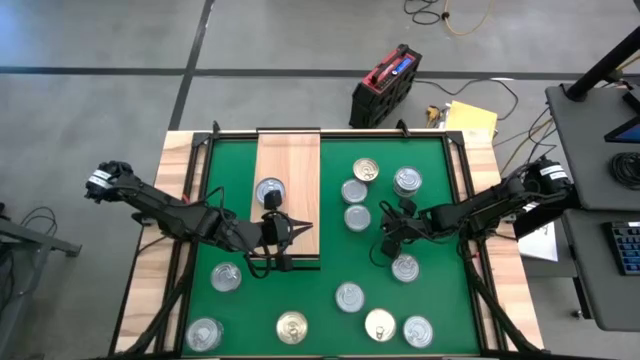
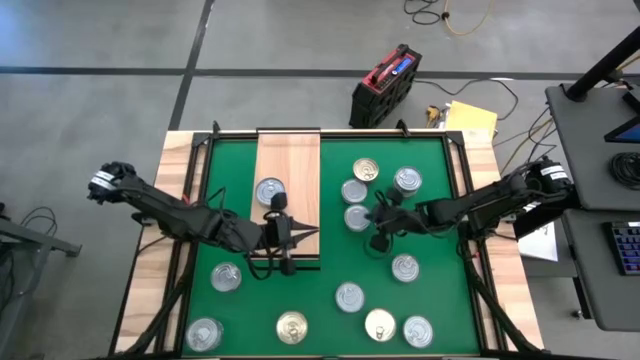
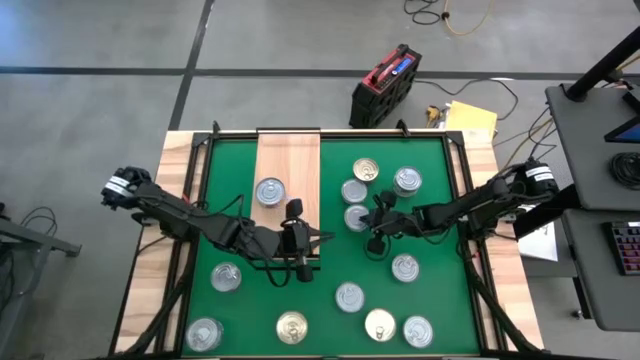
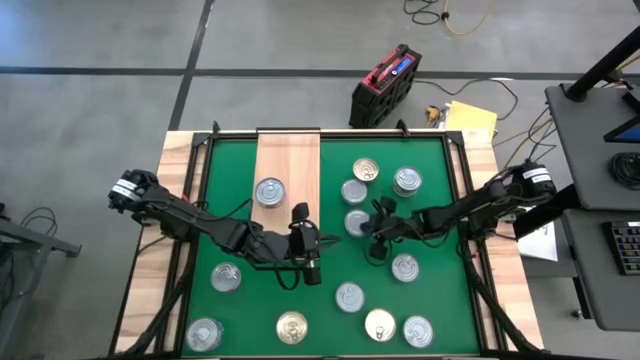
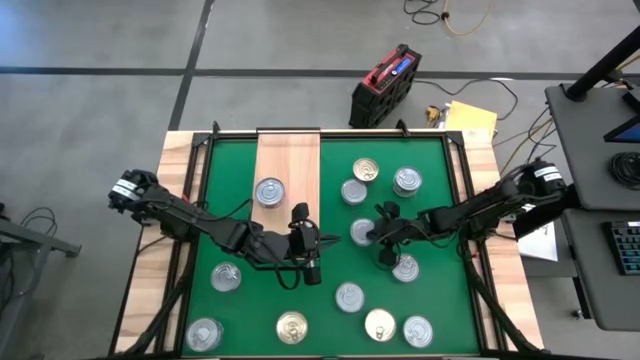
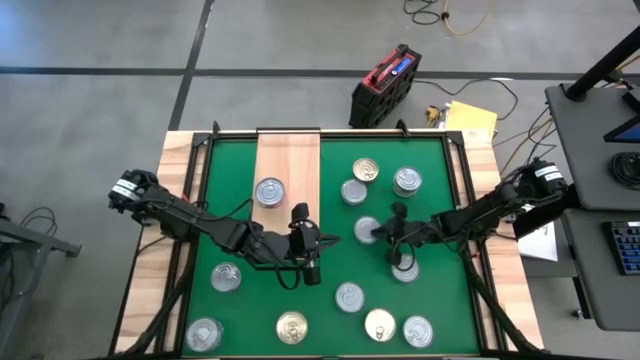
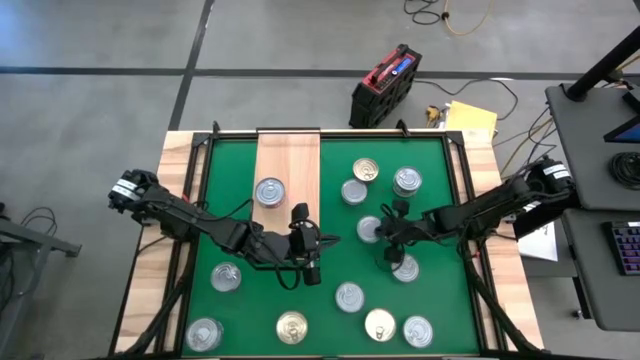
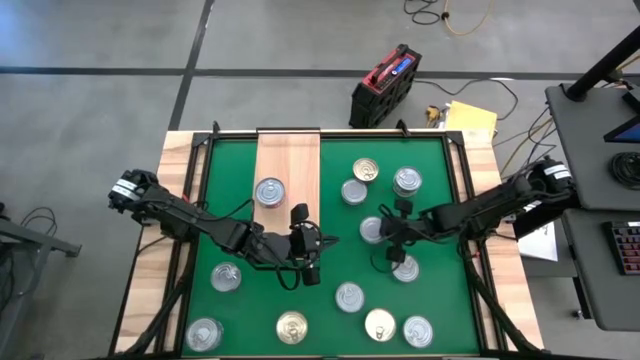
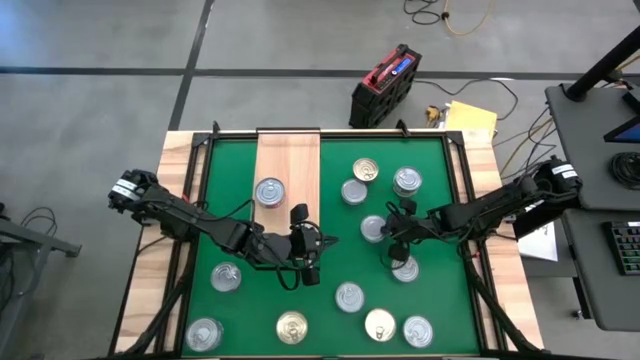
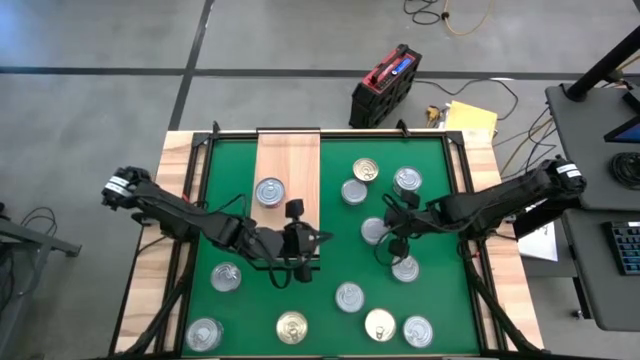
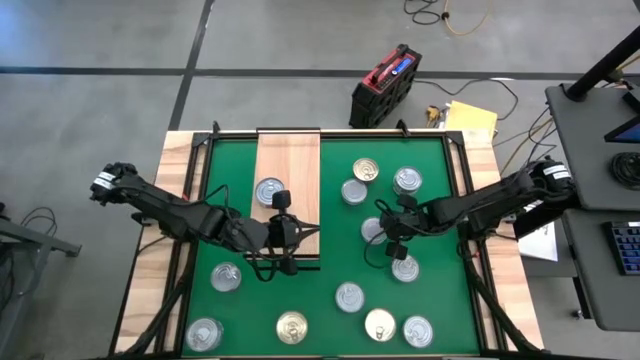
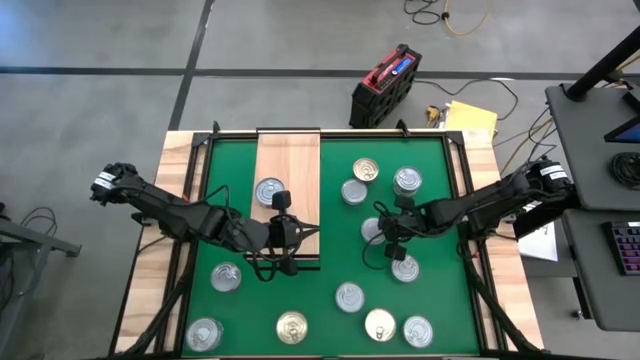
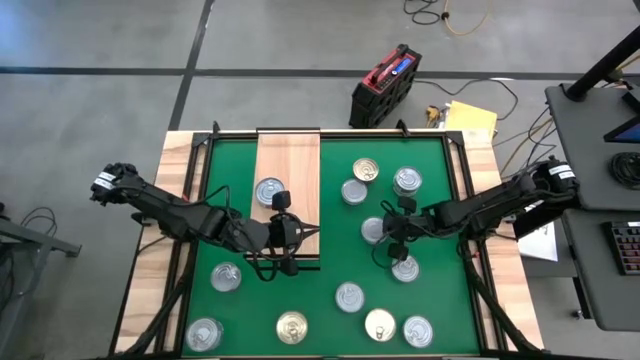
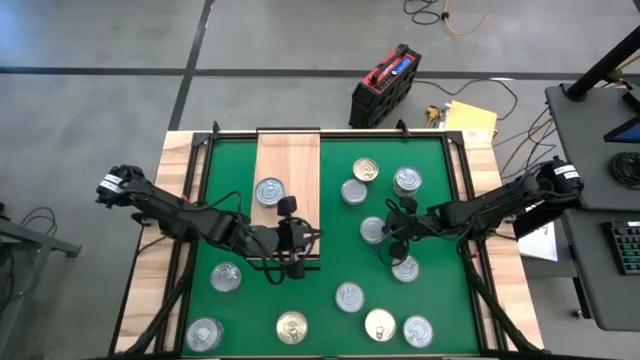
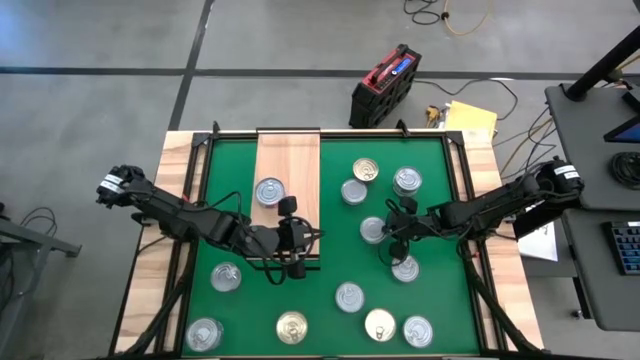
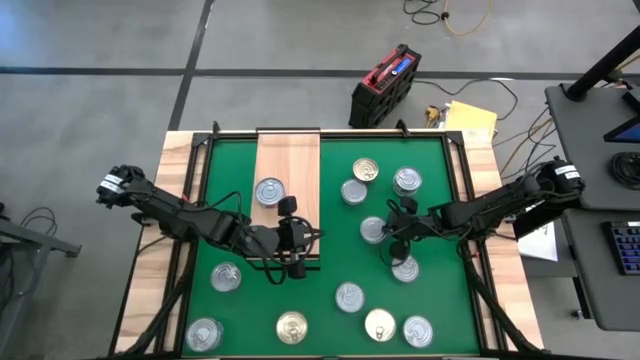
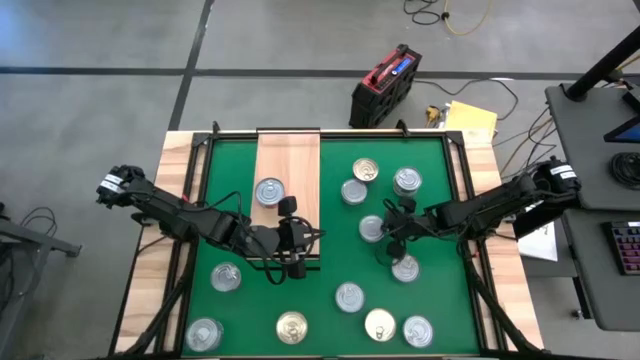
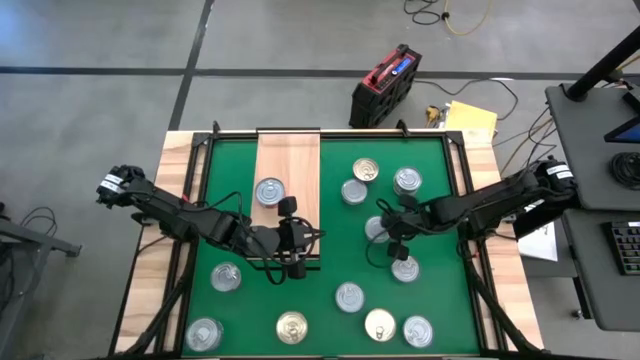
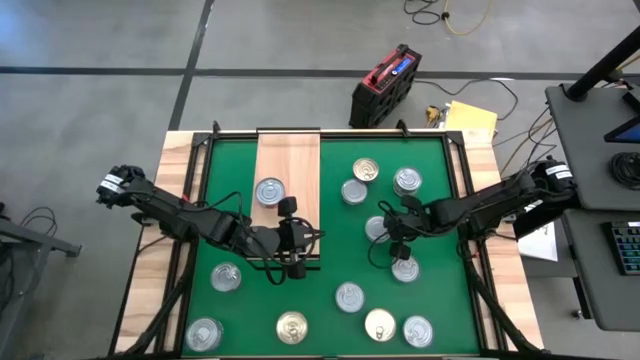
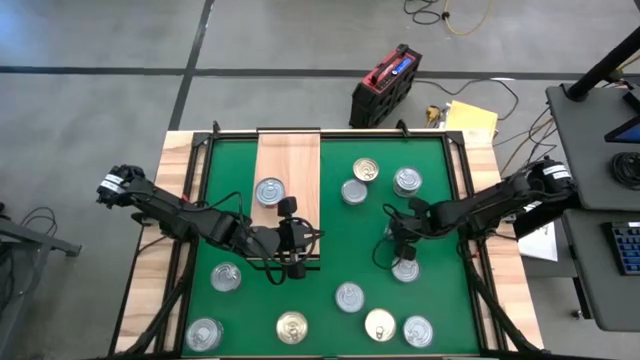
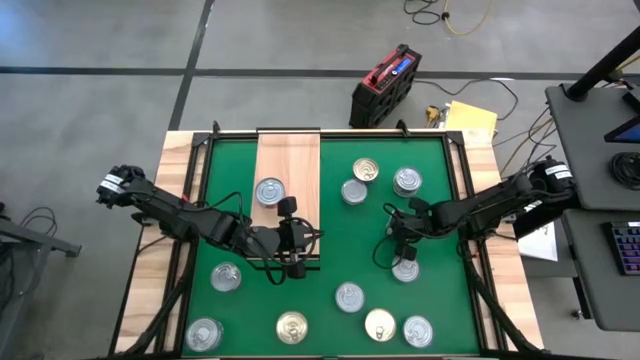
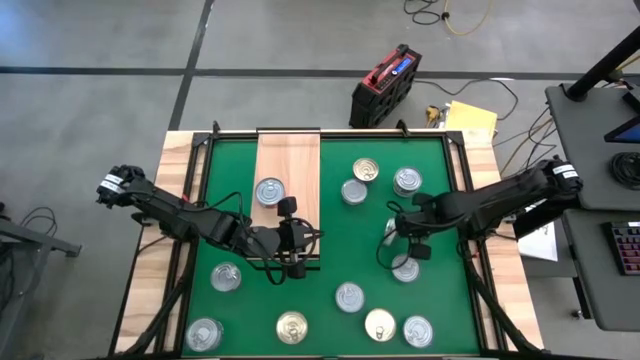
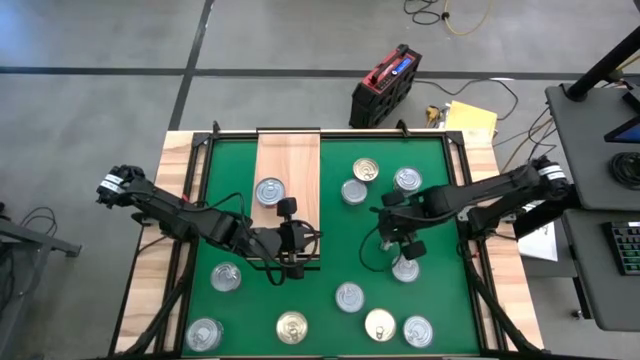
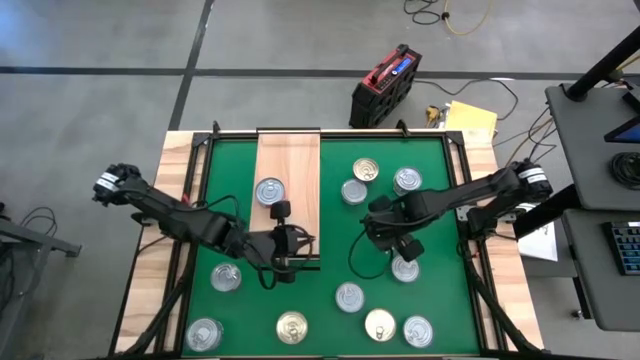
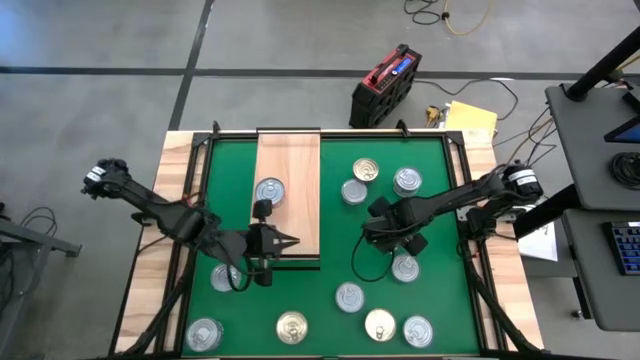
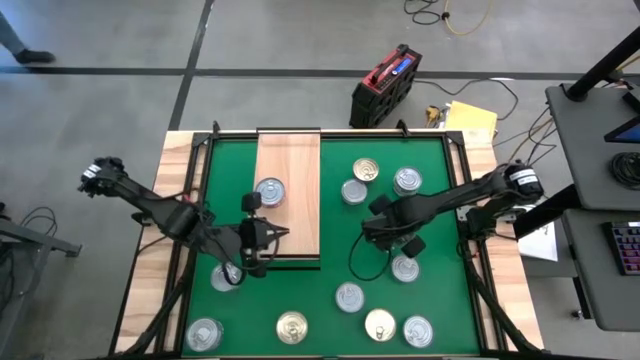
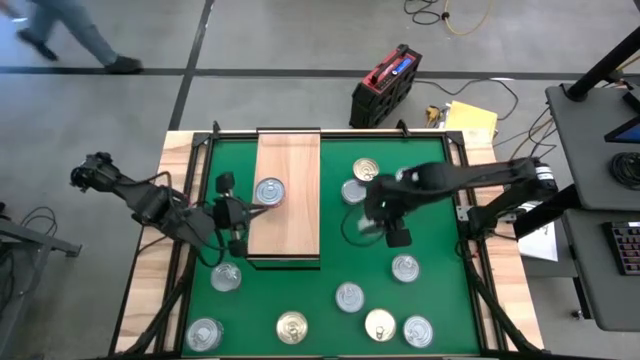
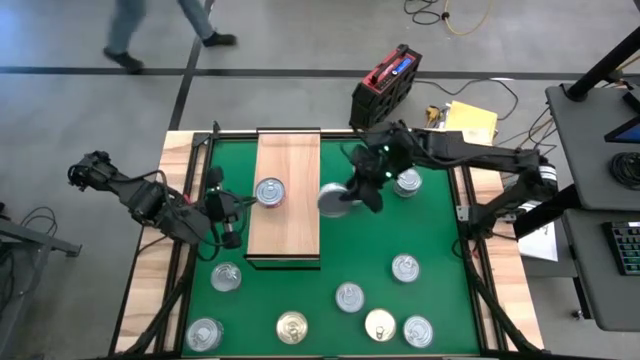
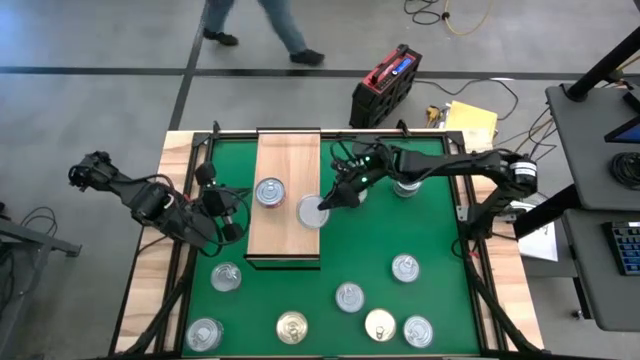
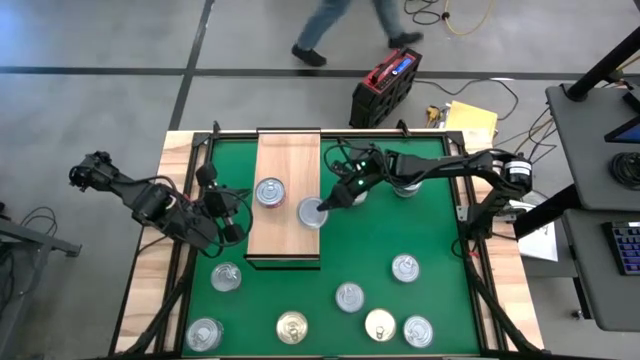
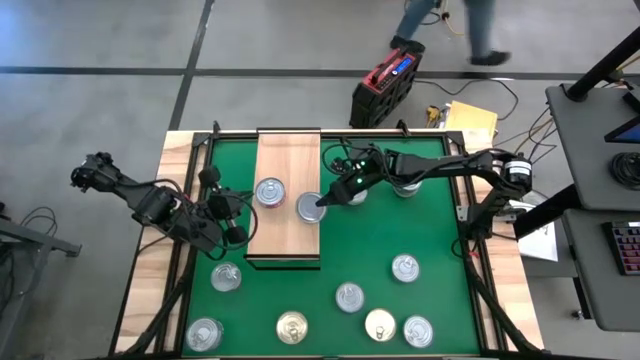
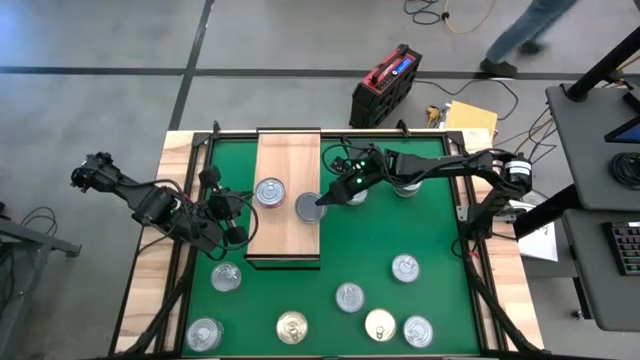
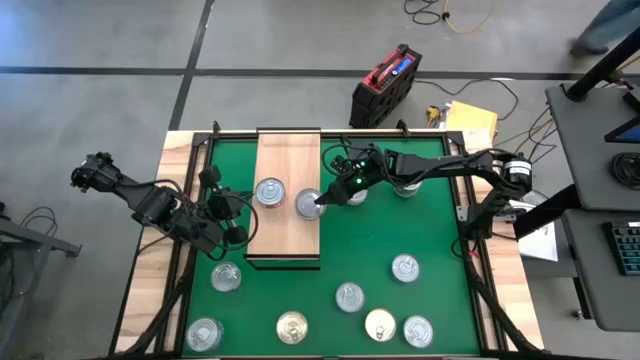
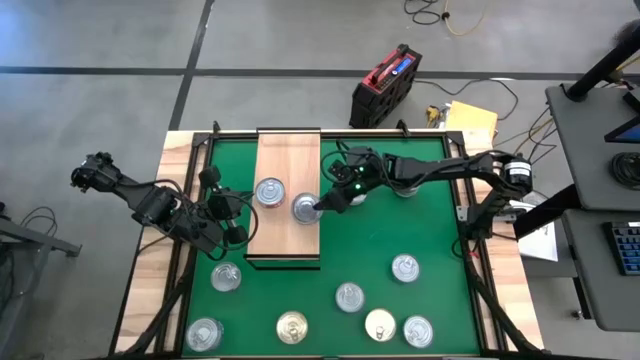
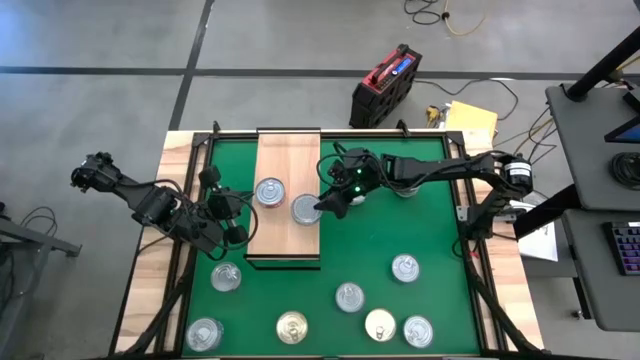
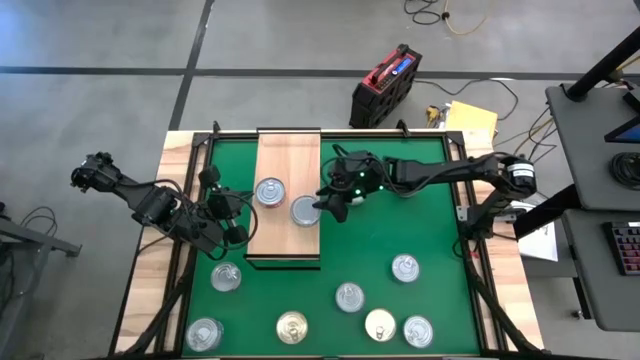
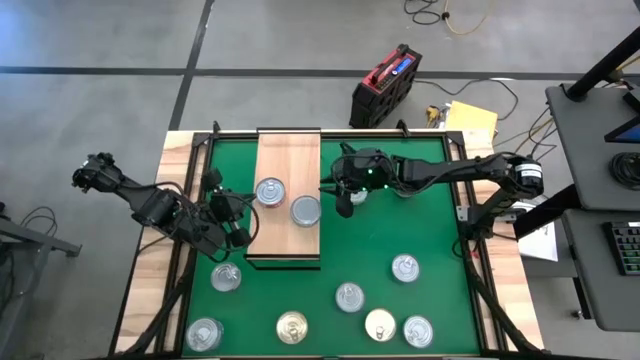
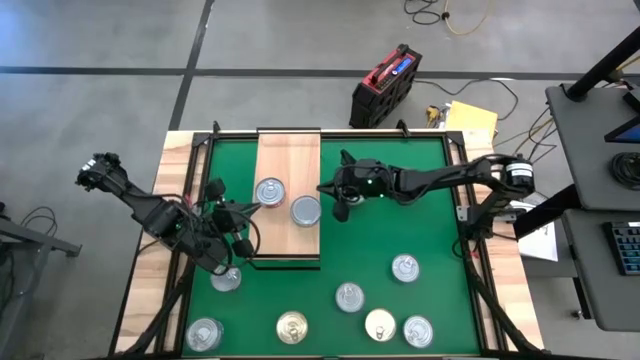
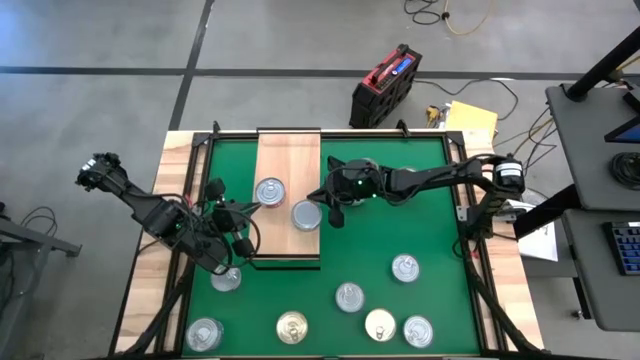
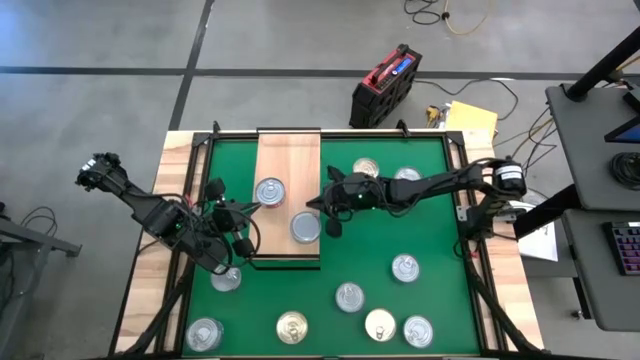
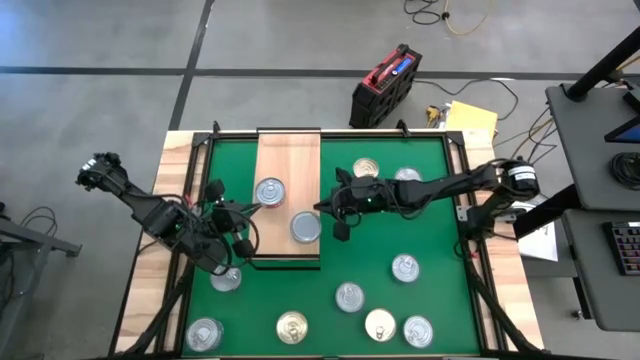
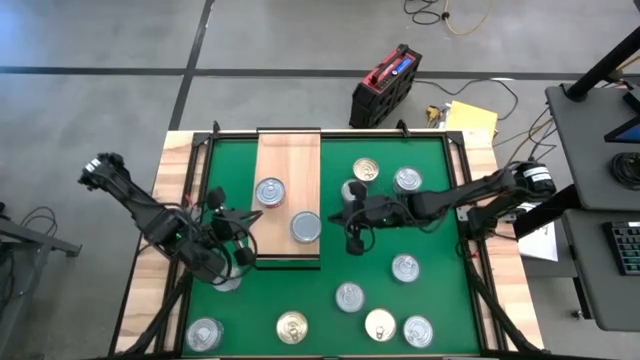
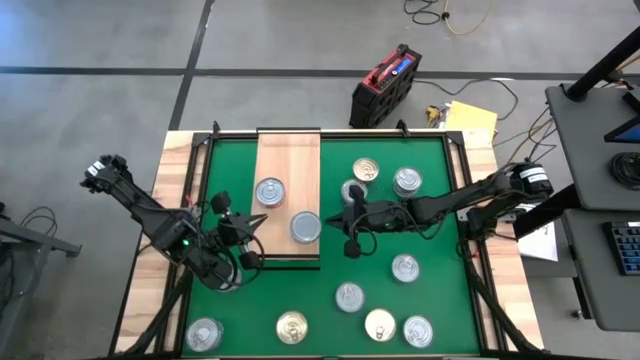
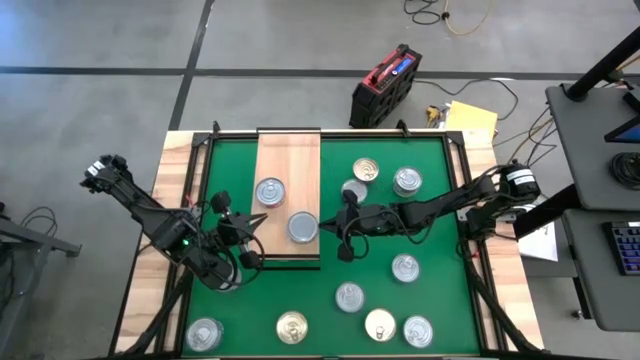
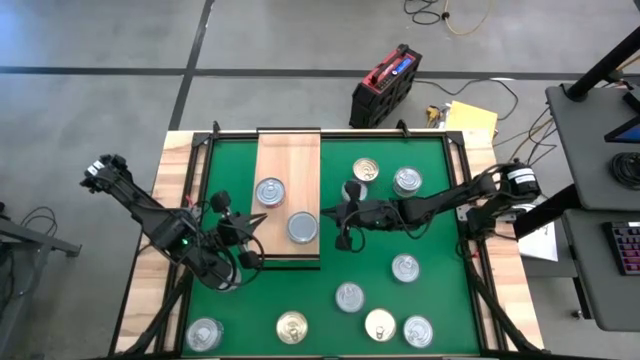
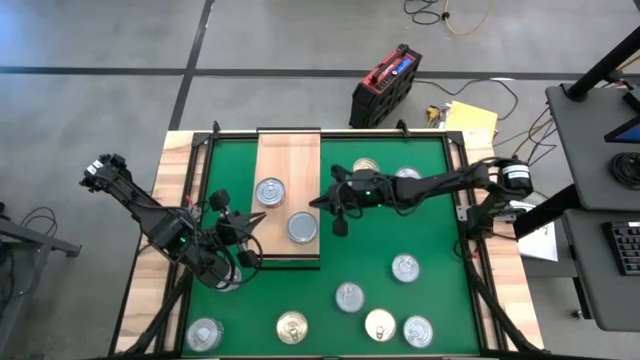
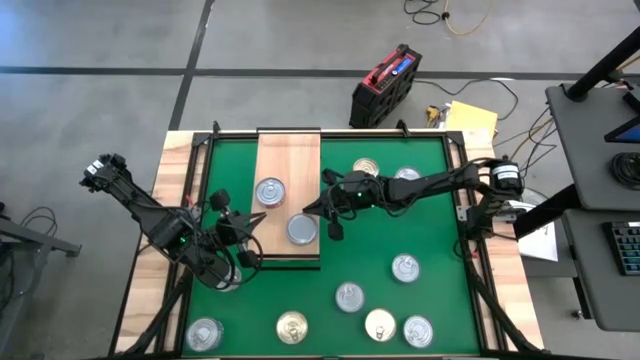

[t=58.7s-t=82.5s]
Task: Stack canned seafood by type on shelf
Put the green and white tuna can on the shelf
